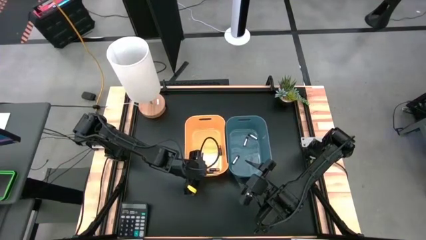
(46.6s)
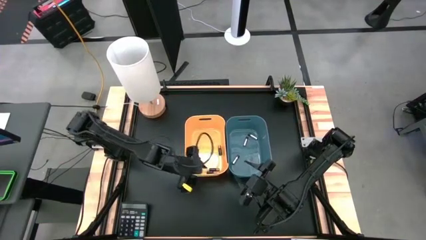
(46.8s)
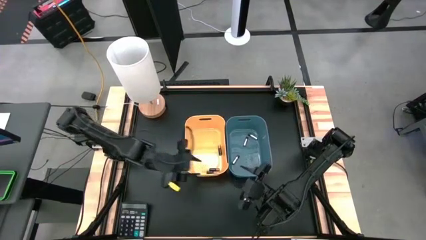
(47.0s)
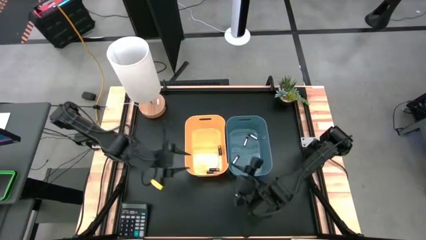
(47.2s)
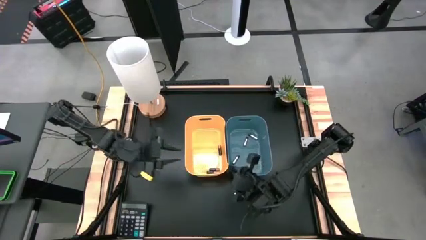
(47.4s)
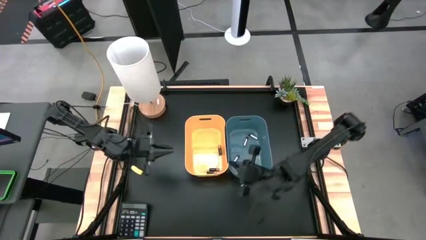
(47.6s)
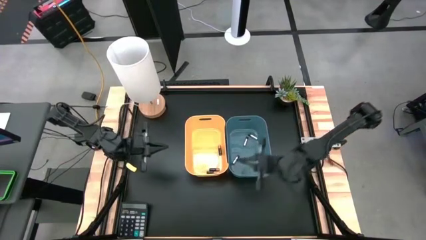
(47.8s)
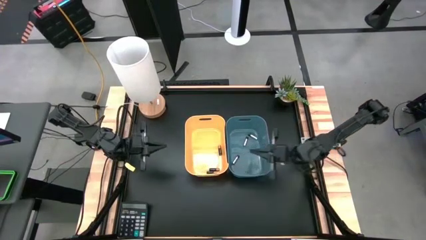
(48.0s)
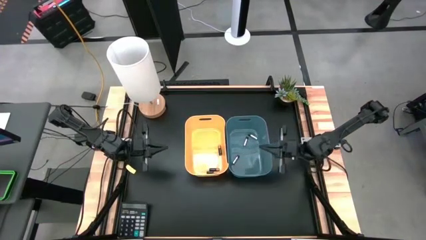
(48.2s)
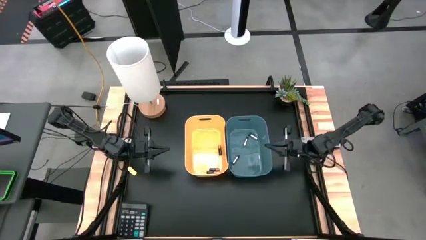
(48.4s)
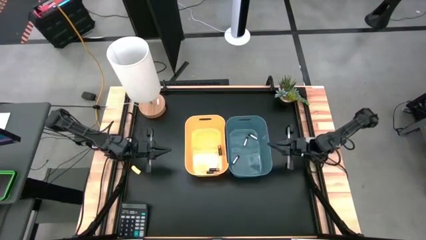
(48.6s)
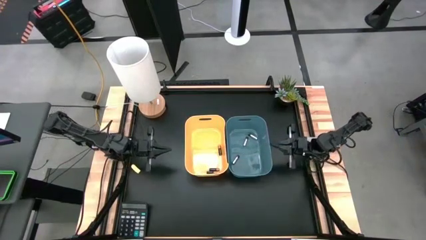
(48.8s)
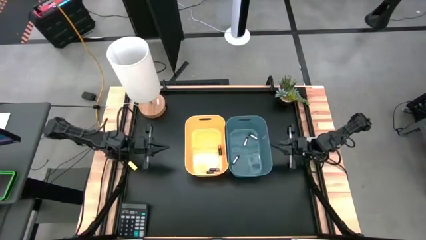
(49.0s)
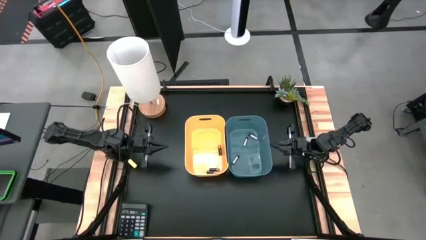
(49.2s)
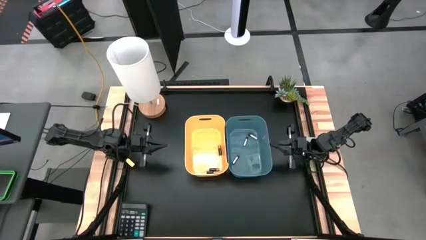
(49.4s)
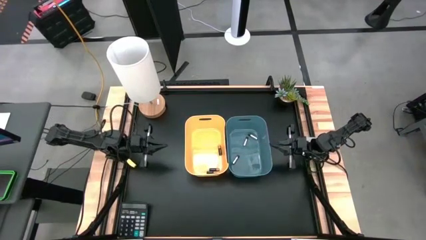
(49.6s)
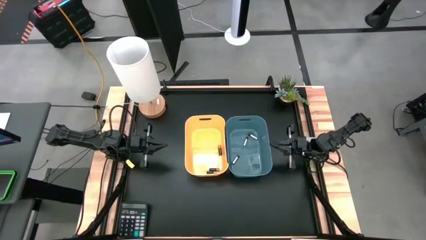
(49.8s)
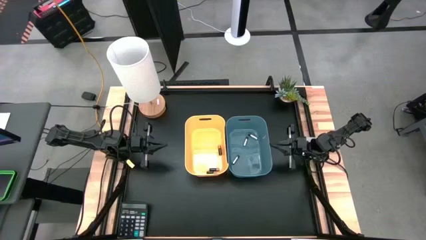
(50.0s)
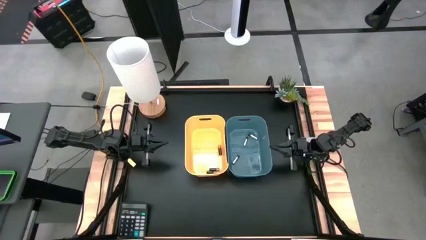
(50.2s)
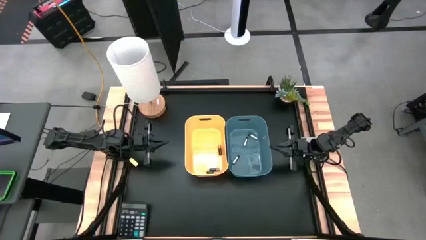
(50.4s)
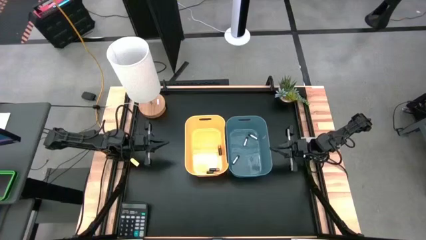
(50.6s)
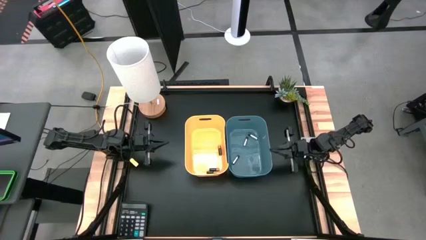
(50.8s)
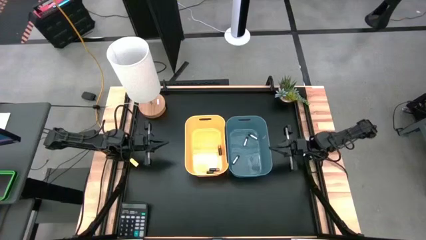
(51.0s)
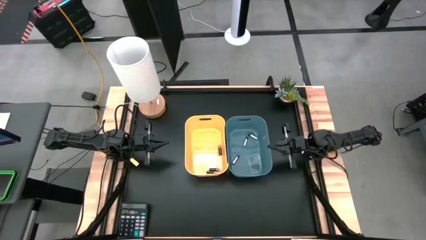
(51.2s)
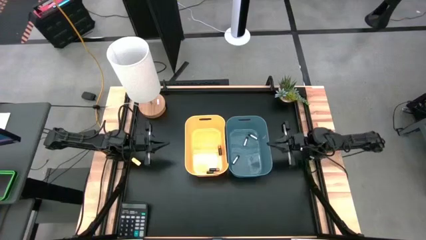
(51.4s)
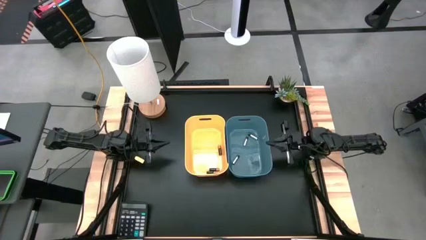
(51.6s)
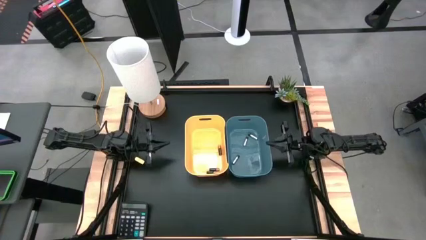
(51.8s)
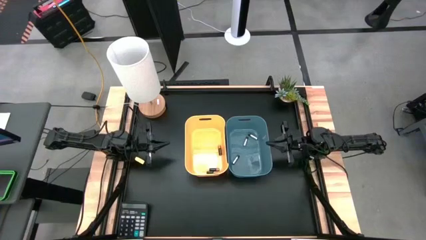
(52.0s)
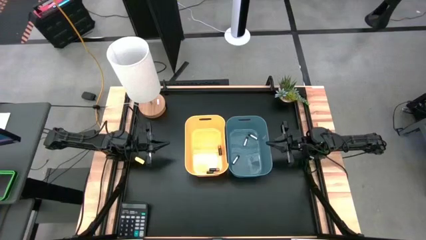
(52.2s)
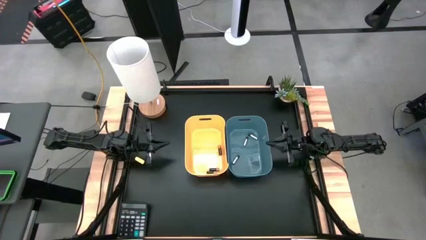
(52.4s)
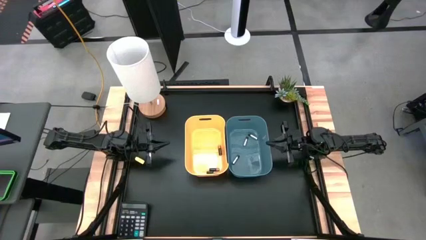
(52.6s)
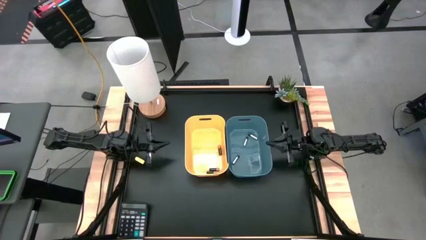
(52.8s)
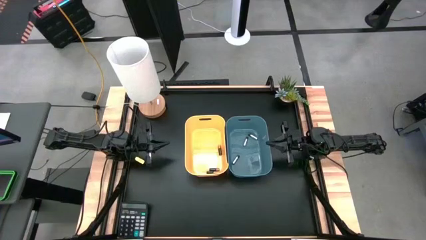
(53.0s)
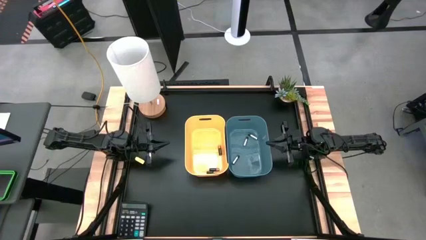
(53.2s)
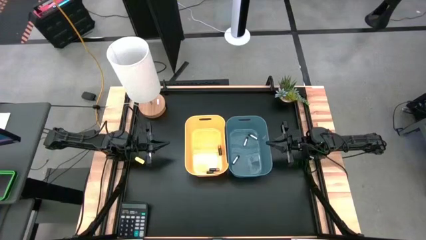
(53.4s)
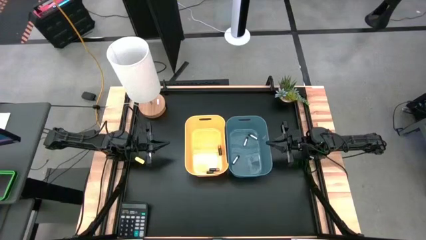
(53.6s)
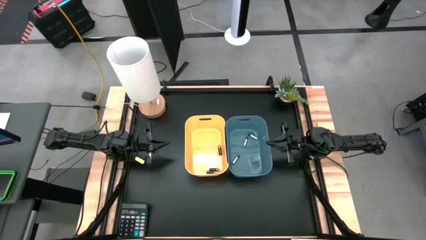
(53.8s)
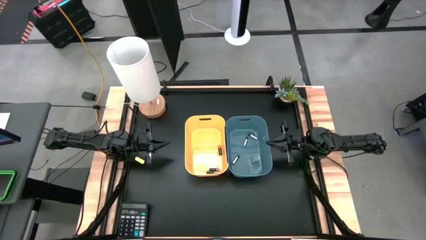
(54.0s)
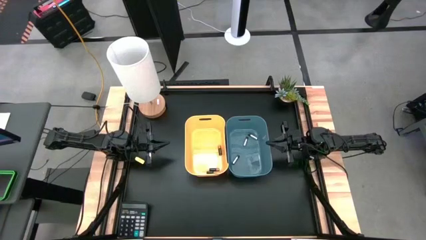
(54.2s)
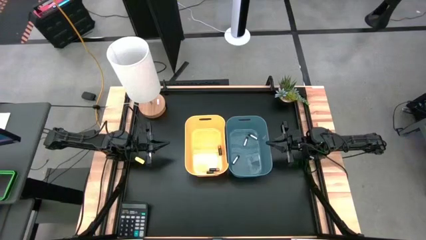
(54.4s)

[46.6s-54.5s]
Task: Sort batteries
Return to Home Position

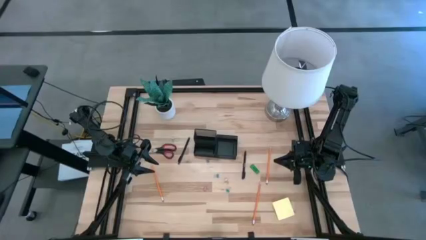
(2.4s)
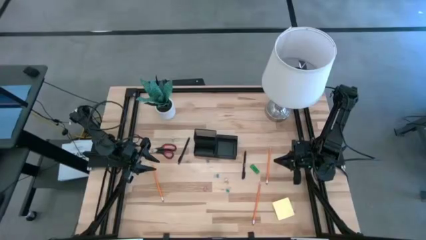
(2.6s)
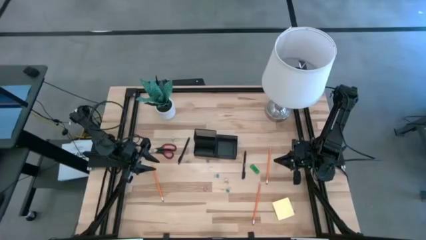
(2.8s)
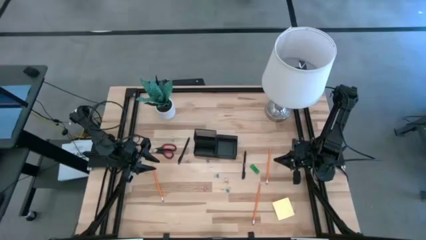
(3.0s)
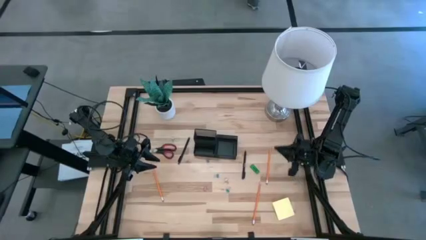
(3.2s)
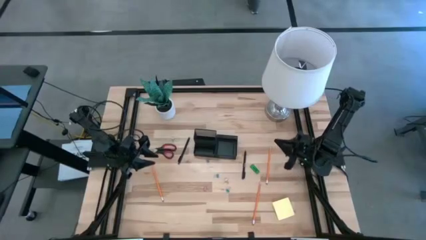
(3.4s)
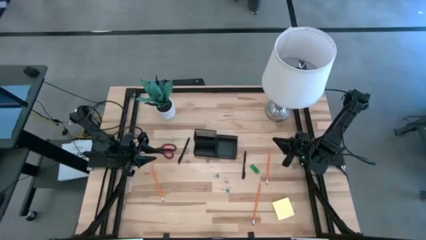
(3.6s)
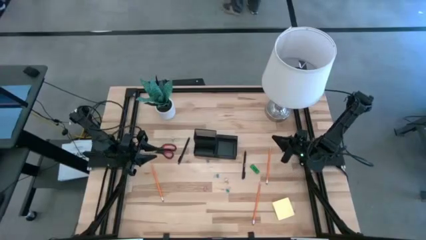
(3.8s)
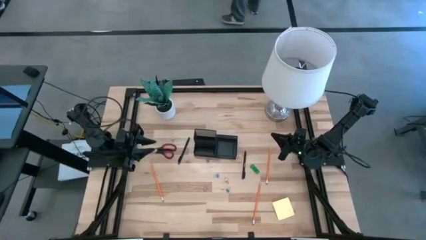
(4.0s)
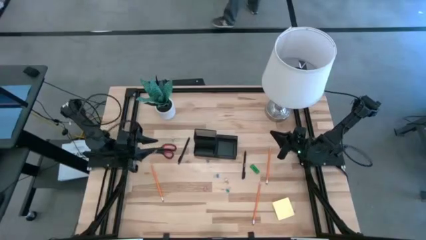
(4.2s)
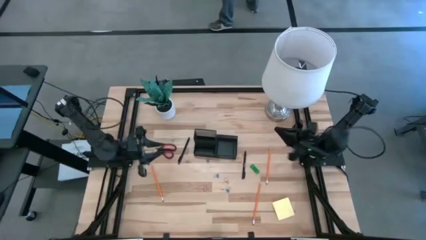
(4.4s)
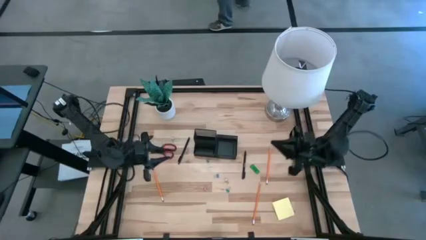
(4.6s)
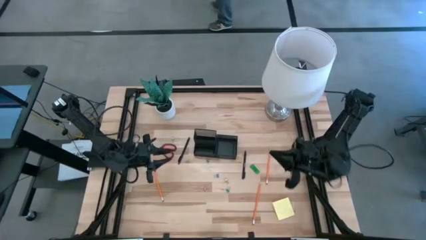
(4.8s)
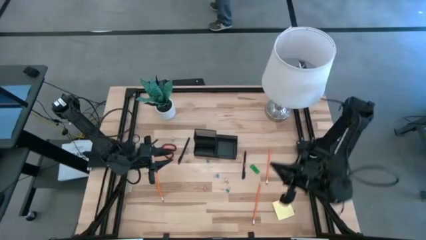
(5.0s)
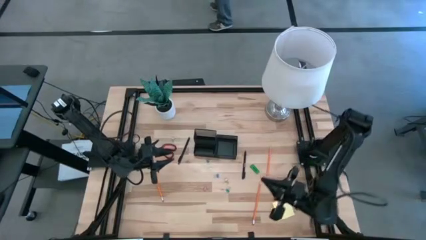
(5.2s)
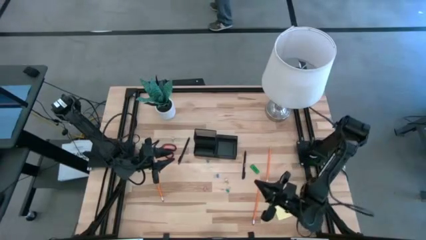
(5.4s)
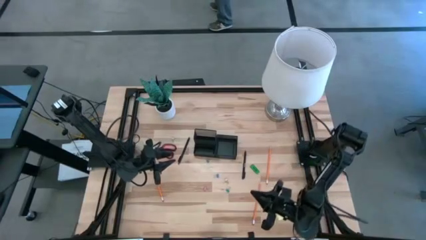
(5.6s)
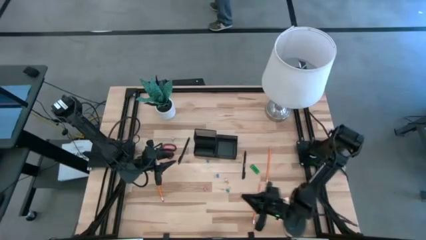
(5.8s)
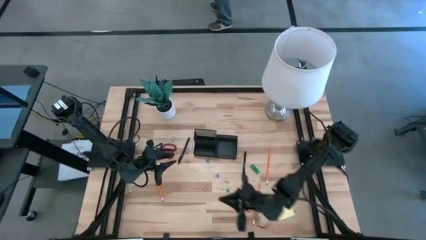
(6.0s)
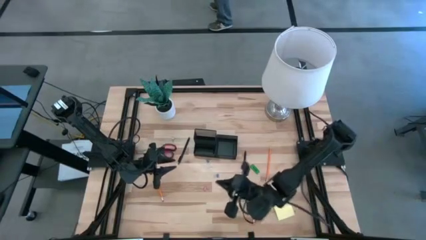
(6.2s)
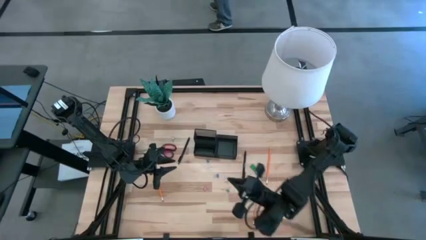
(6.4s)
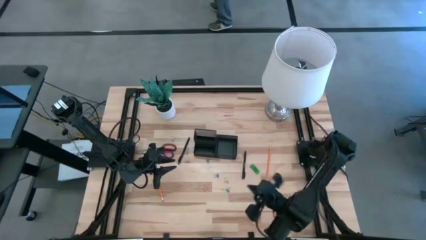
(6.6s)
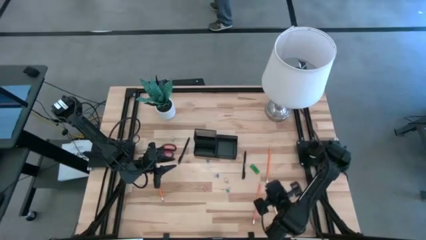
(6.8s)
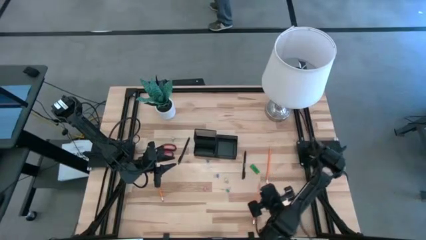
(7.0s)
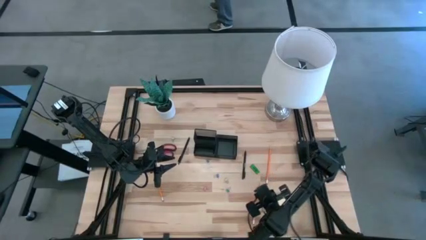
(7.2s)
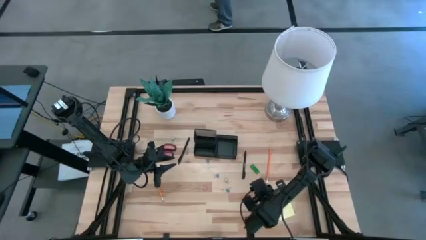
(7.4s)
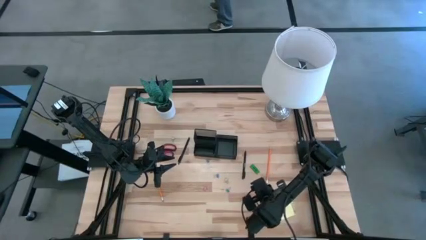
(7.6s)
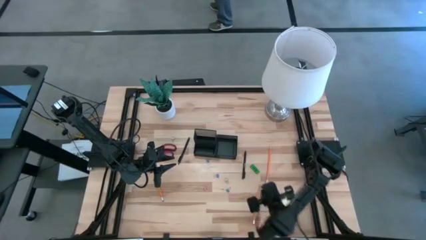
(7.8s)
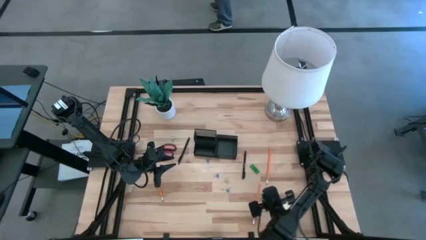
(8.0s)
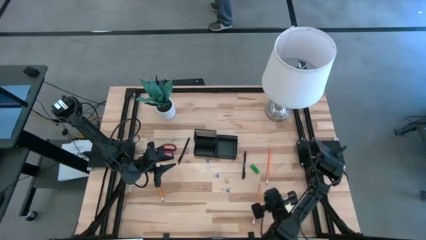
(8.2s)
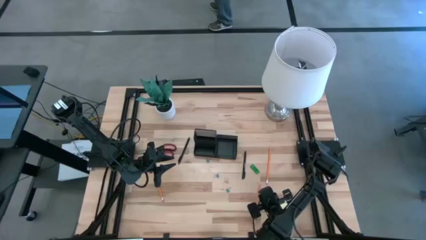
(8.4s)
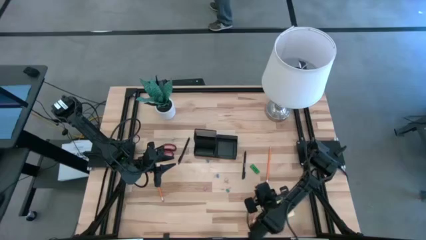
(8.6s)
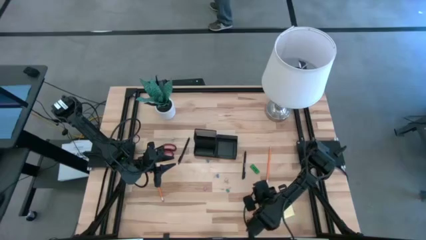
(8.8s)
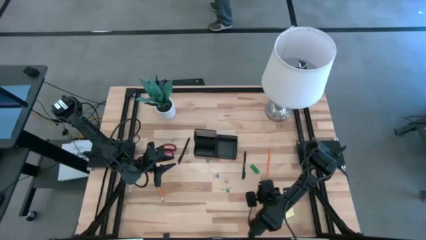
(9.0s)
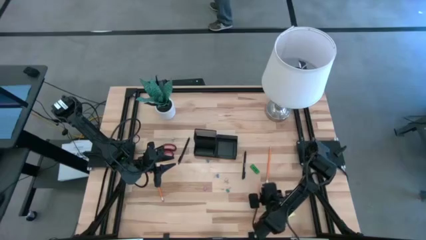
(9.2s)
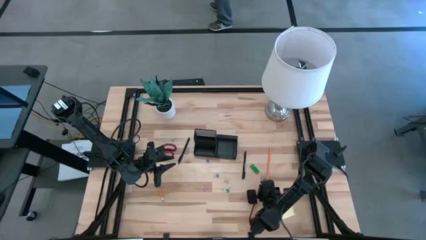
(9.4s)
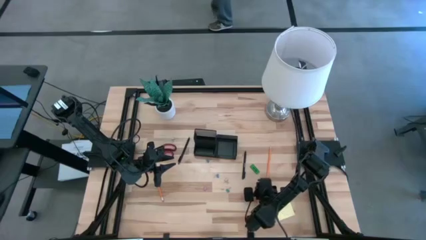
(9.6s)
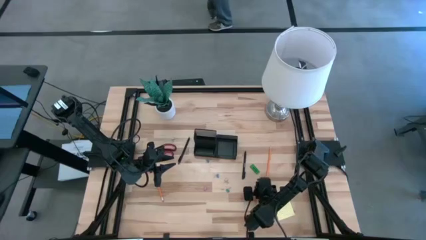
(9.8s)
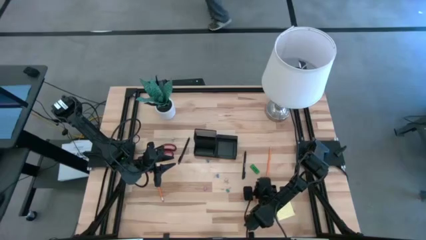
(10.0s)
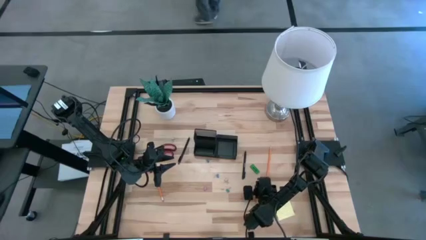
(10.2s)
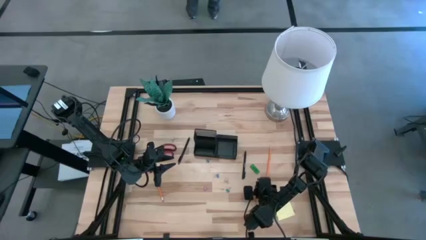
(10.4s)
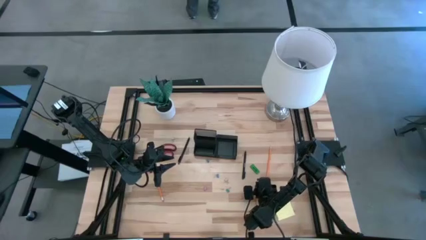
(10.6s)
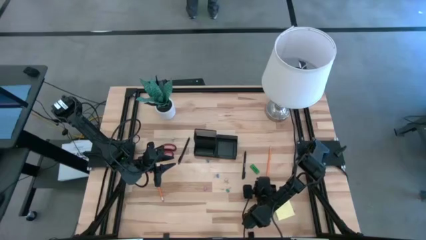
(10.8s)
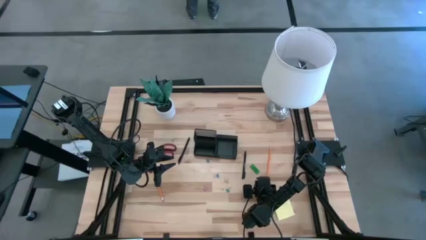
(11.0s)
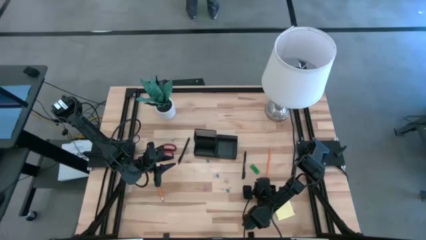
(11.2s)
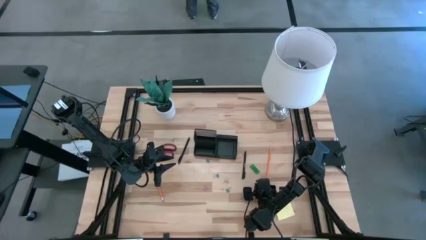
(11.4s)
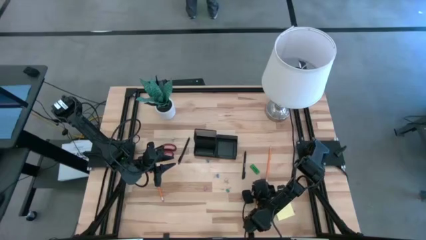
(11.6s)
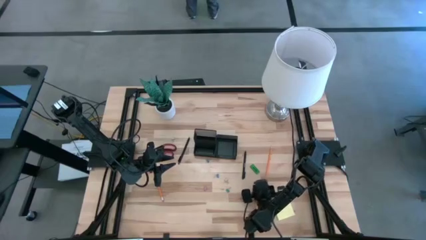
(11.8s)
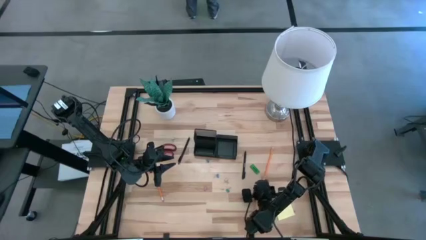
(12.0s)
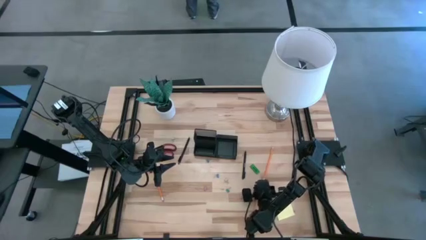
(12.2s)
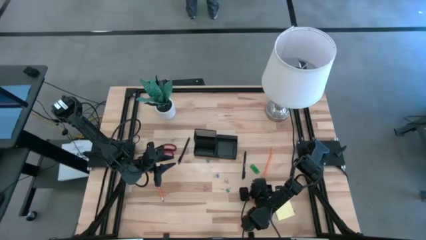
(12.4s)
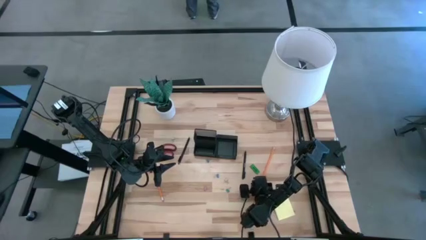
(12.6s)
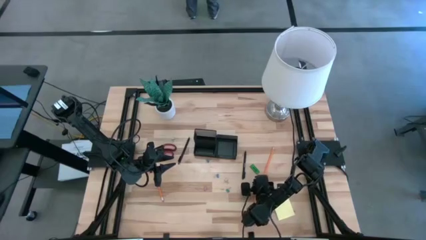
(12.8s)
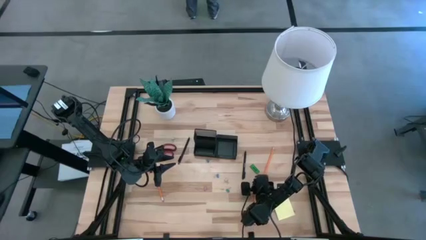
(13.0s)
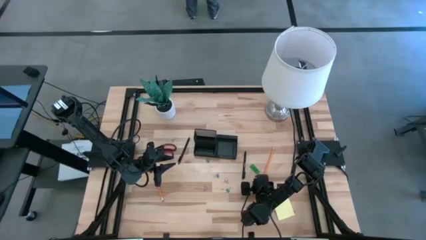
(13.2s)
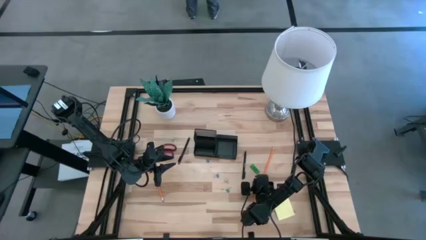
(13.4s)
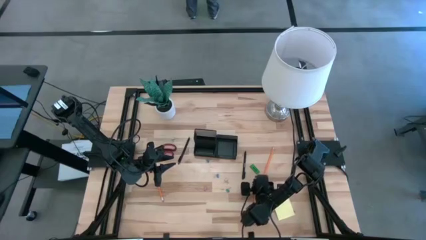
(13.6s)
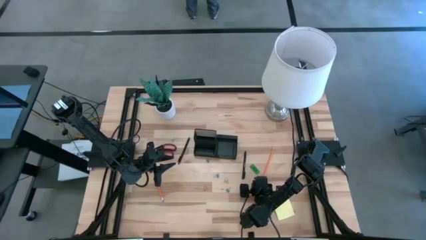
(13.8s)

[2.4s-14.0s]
Task: Pick and place office supplies into organizer
Put the top right orange pencil into the black desk organizer
